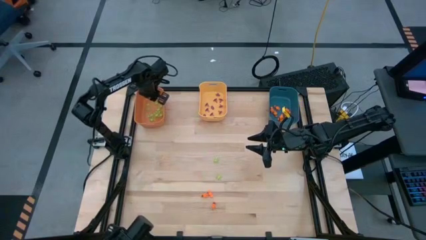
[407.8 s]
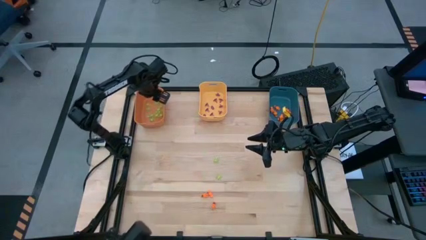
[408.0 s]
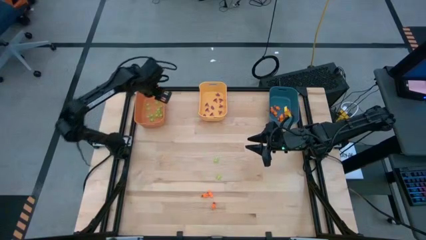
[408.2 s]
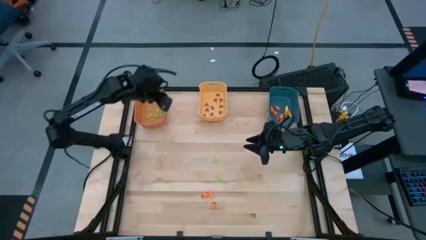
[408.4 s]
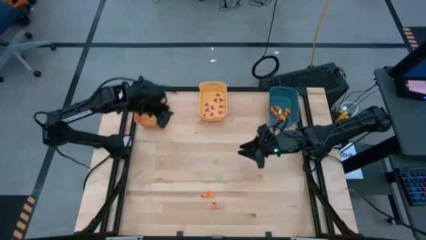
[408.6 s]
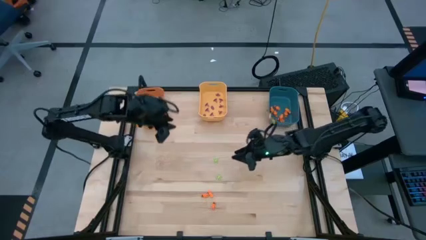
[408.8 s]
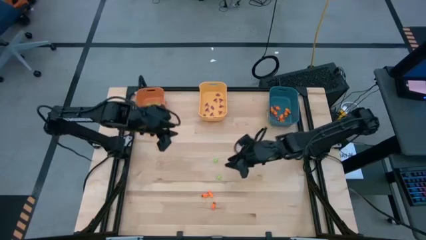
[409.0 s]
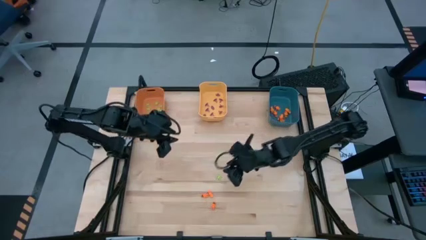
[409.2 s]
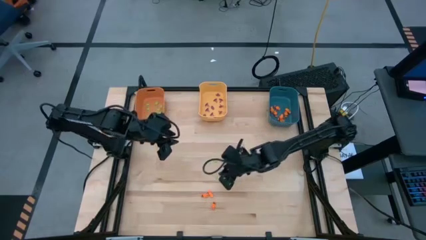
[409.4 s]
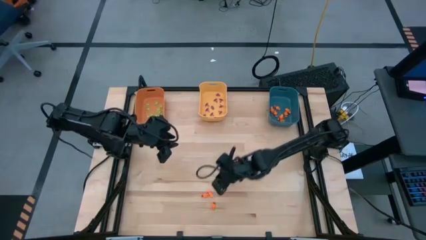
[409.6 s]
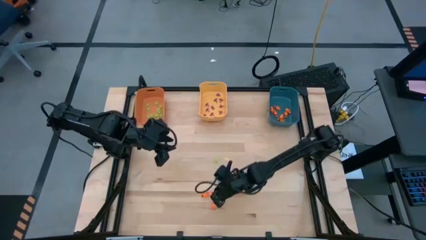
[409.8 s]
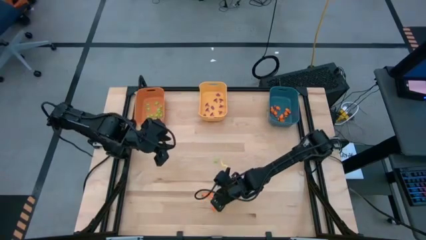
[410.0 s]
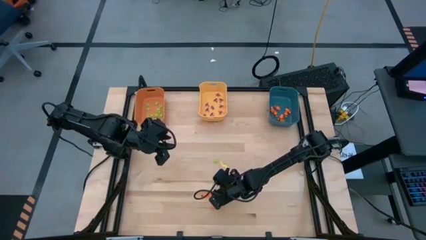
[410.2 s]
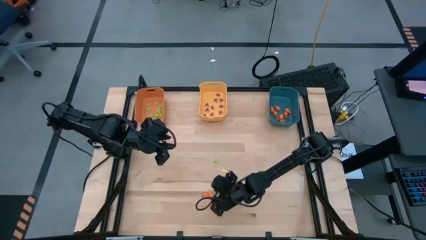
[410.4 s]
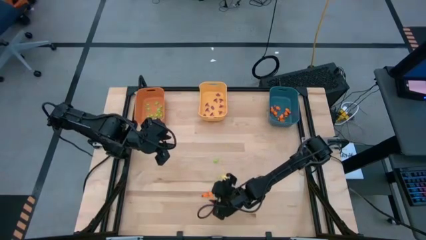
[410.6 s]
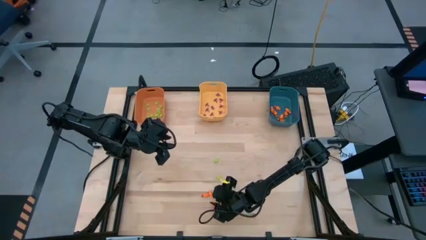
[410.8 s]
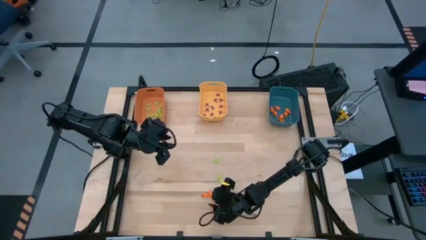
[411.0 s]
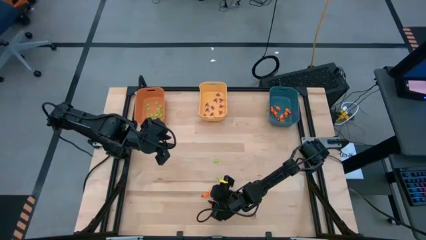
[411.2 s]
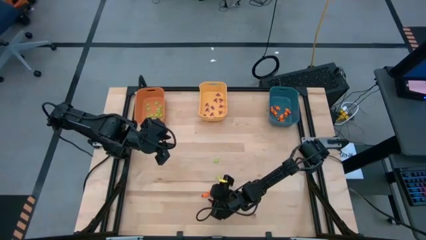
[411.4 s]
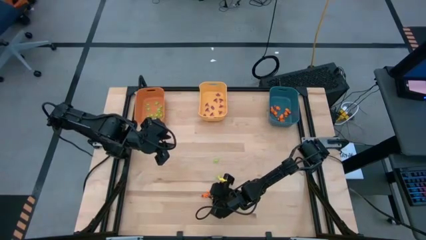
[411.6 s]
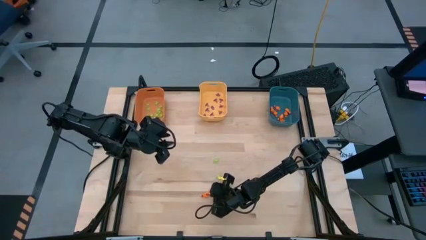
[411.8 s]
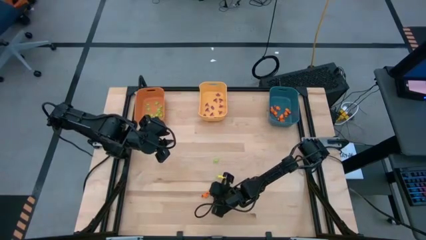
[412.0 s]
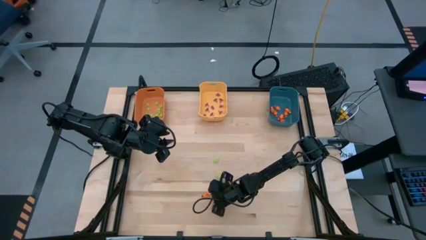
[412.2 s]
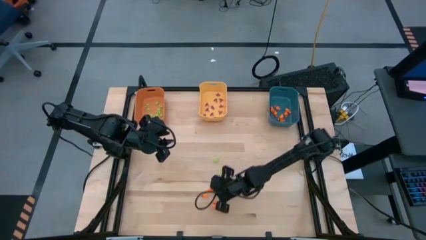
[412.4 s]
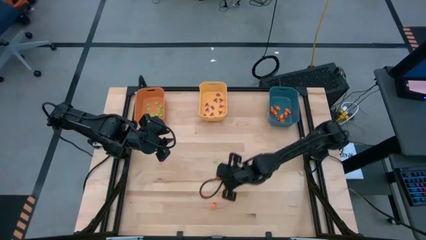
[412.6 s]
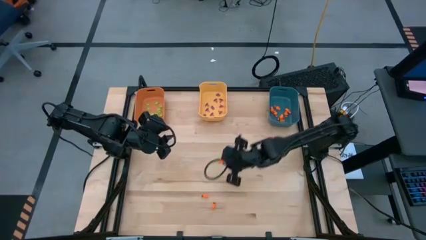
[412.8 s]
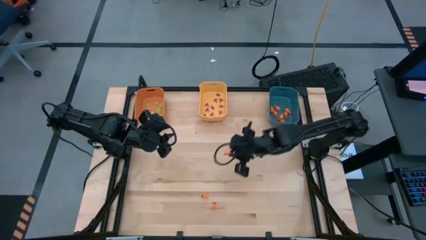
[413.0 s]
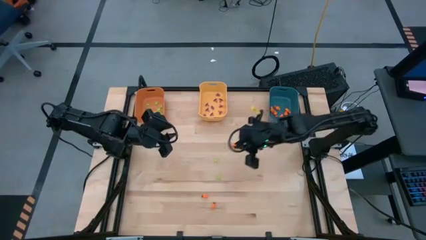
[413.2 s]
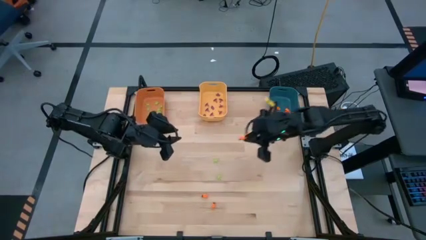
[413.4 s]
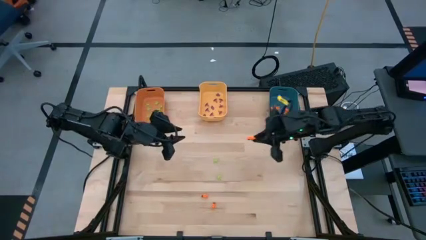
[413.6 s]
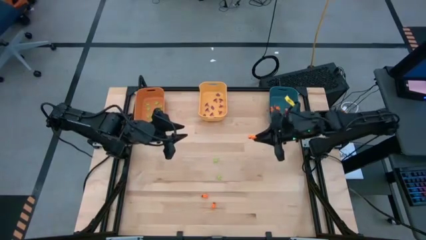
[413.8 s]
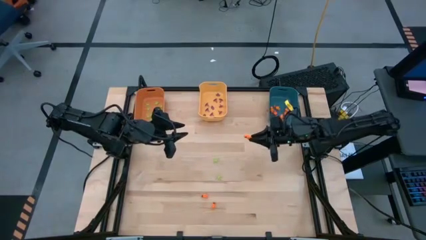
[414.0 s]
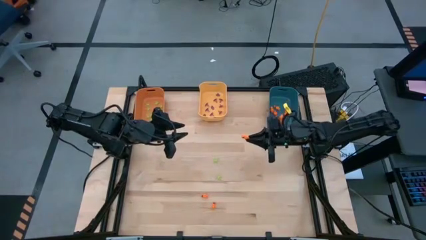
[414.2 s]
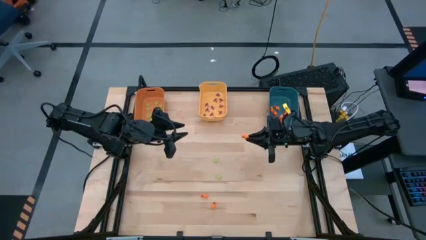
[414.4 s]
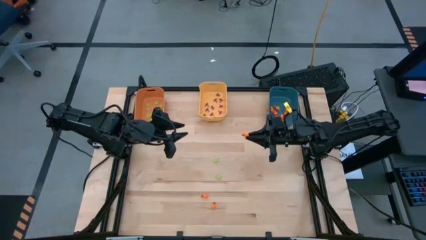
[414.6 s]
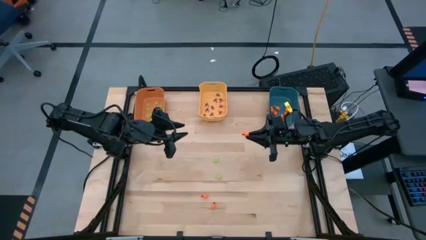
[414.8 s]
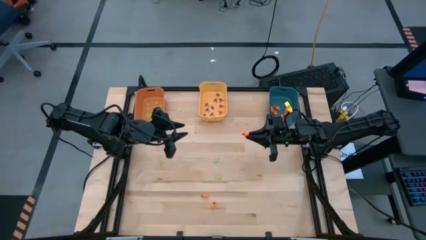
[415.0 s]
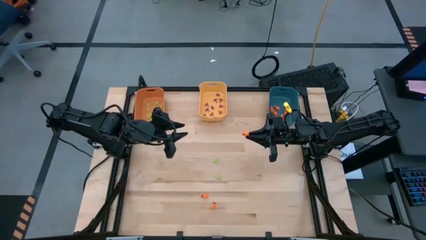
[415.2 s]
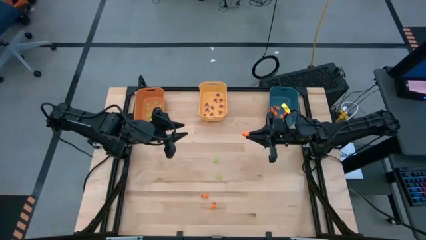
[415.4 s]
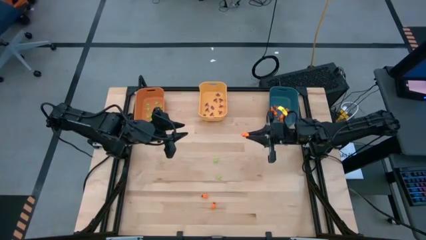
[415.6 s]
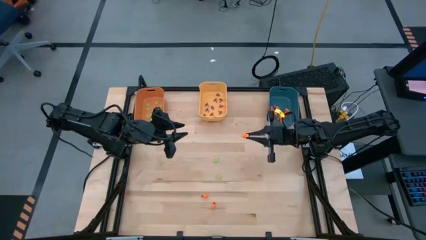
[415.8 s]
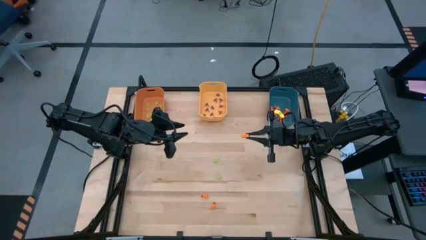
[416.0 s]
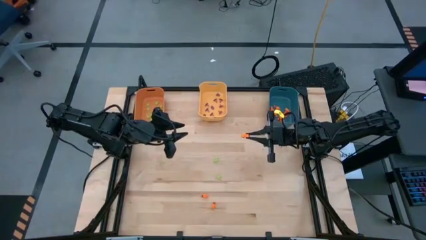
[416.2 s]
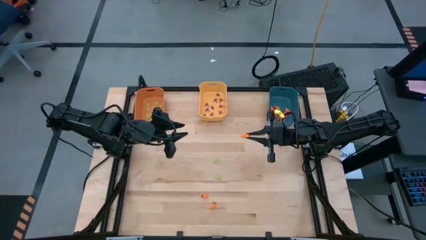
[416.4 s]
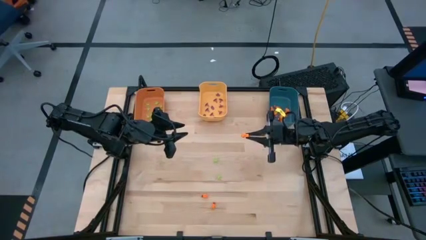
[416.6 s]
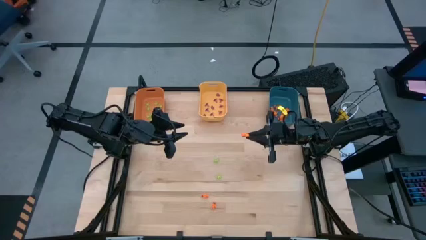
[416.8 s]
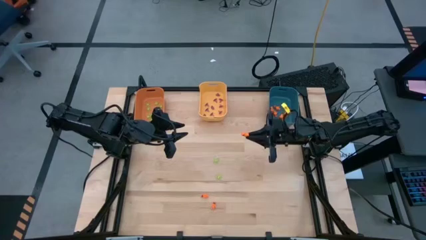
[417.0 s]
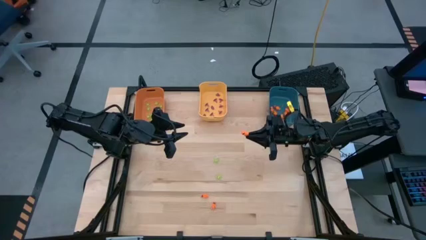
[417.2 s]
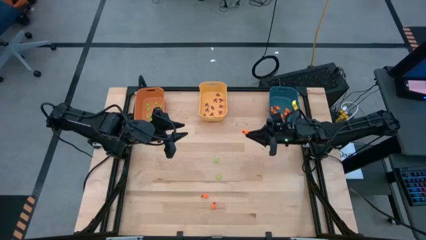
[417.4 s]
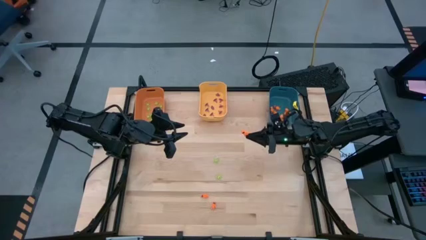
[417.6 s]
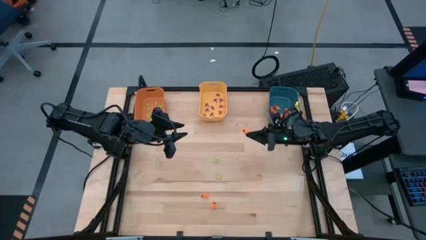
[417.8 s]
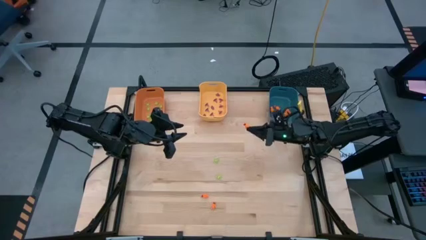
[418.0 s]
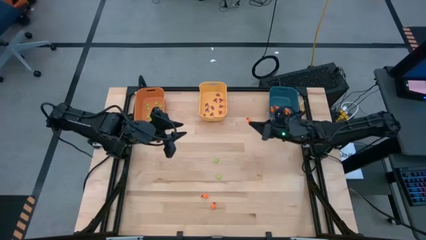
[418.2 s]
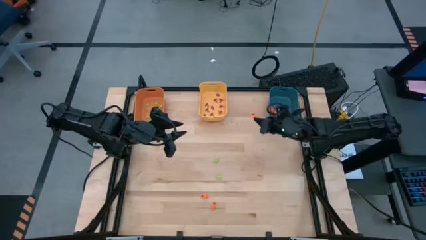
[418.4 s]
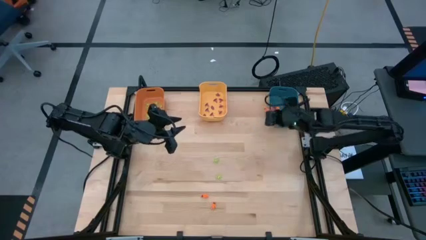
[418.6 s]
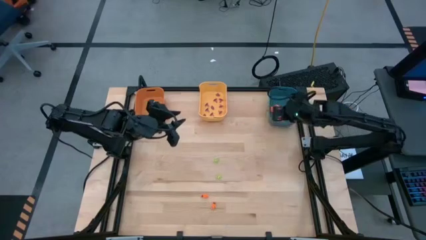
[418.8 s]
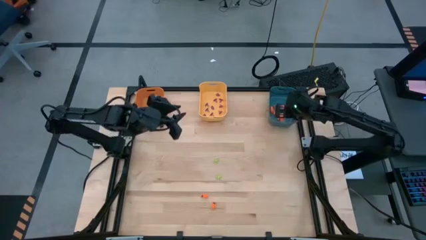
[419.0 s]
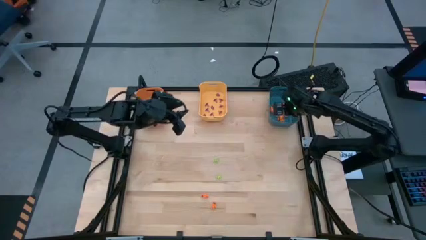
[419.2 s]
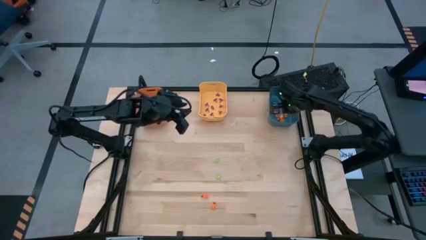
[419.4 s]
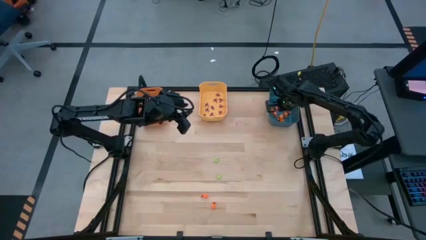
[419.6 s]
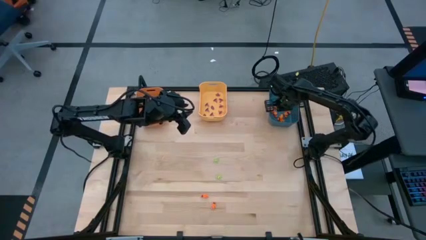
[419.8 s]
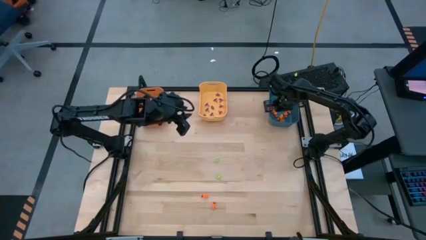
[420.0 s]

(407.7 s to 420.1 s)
Task: Sort Halloween decoration
Put the orange skeleton toy into the blue bin

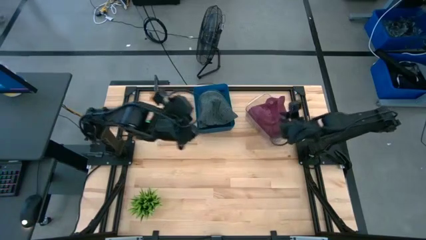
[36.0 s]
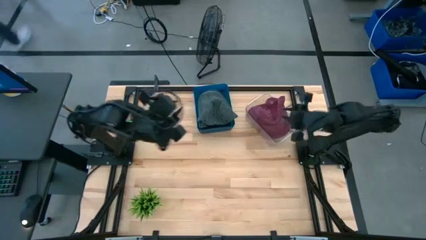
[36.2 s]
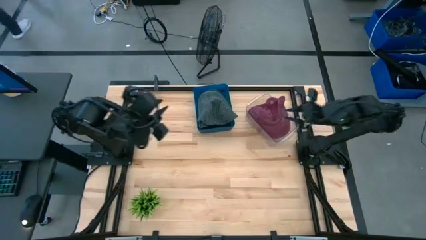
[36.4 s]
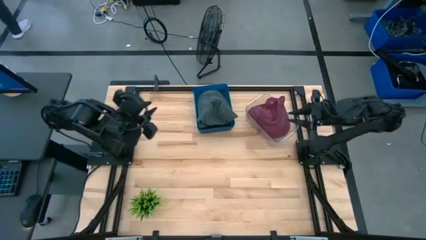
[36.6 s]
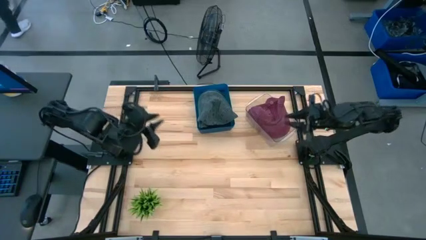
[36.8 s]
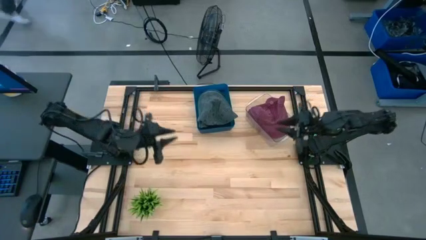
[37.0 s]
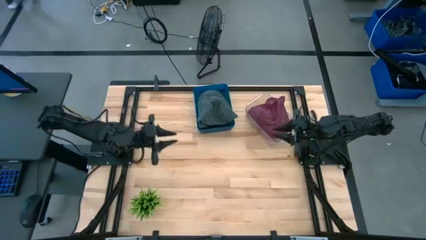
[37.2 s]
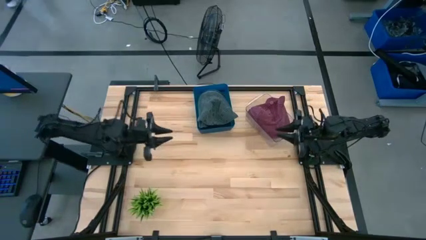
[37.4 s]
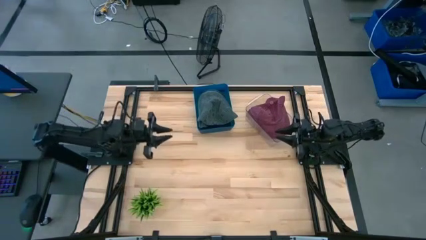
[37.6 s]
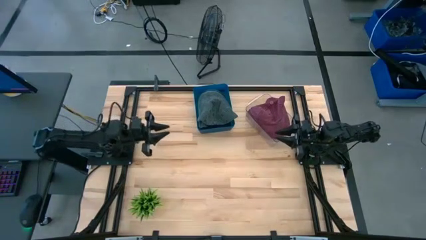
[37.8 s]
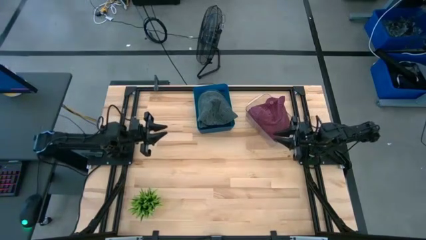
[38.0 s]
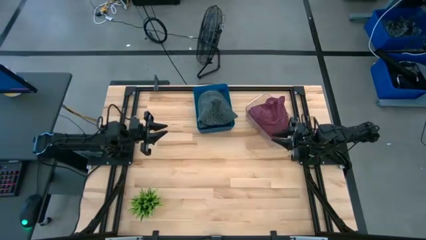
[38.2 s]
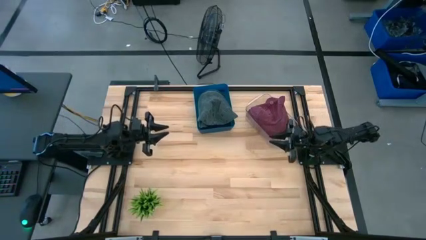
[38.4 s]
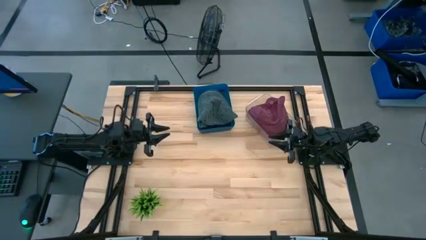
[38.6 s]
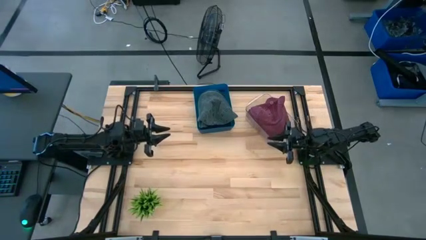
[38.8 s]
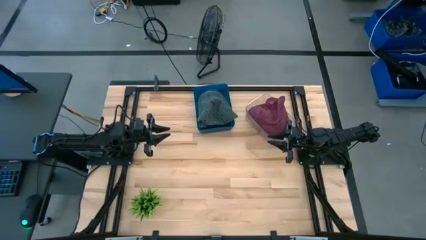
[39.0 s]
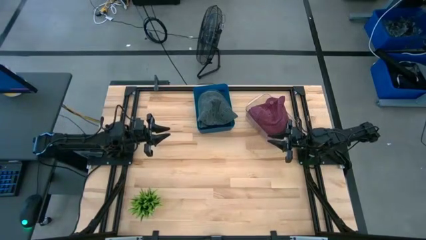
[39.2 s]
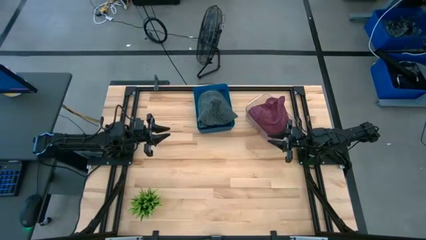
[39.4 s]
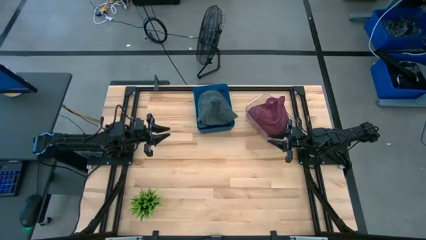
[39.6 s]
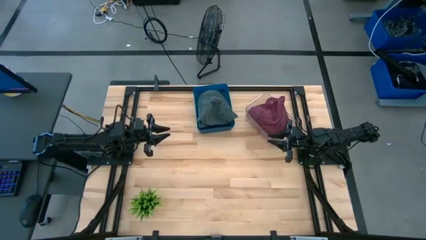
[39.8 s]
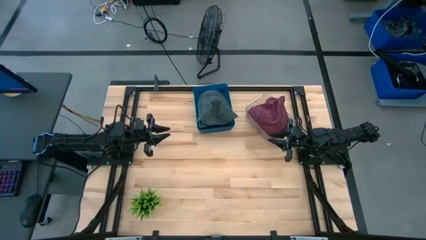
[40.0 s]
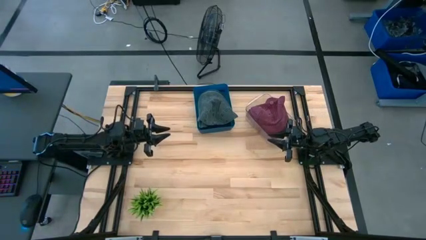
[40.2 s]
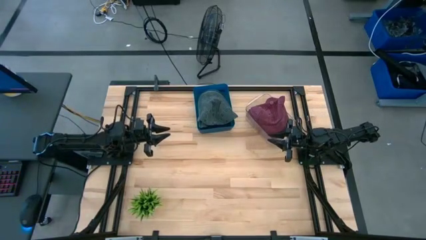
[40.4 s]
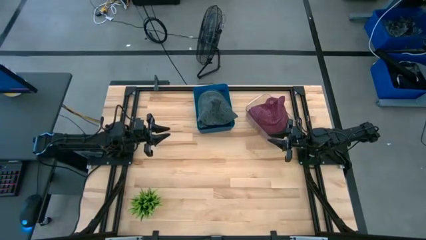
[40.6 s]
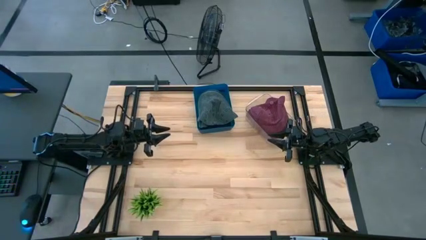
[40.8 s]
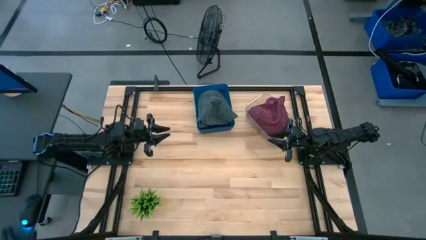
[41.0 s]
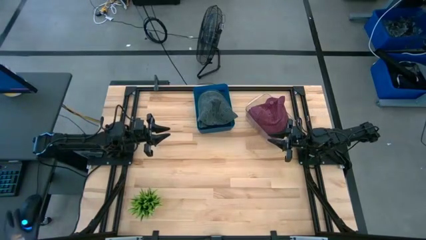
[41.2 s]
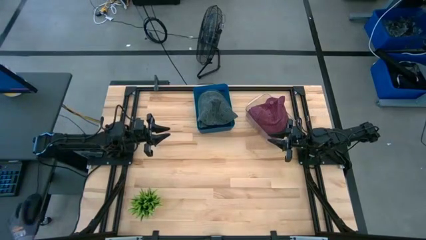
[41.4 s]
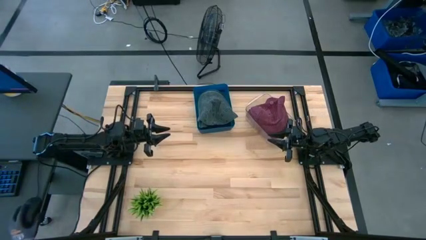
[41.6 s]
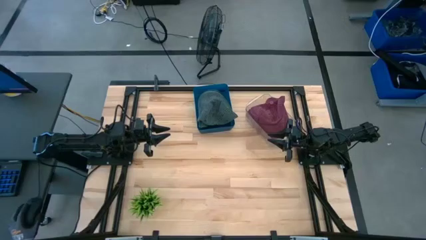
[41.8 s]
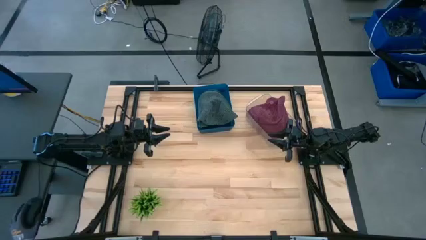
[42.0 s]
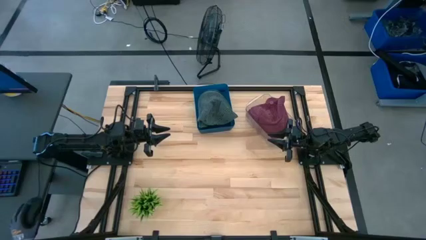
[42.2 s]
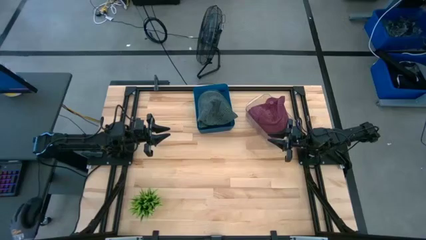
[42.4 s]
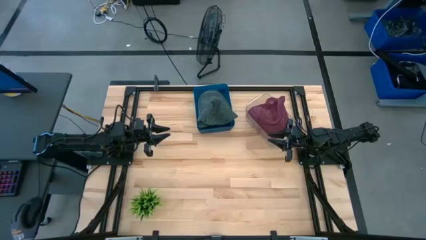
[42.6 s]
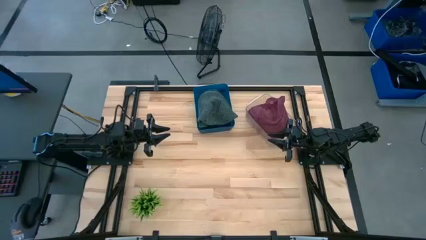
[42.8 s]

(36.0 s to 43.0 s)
Task: Pick & Place hat
Return to Home Position
